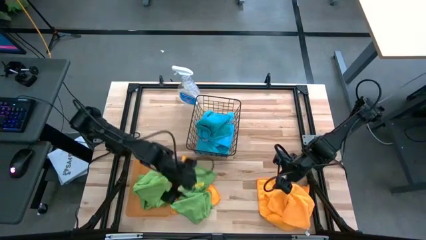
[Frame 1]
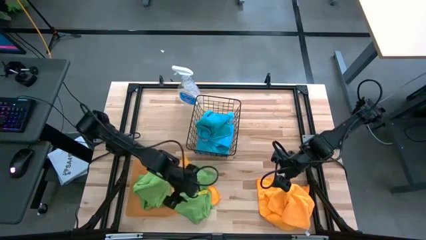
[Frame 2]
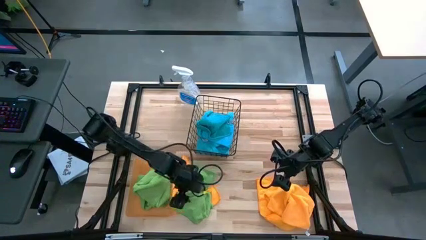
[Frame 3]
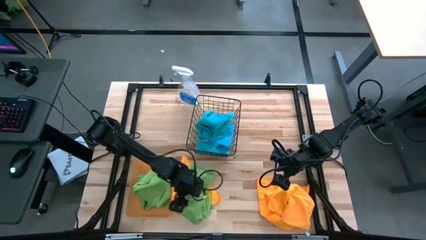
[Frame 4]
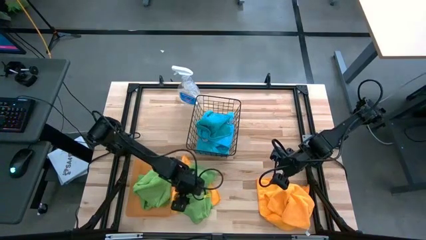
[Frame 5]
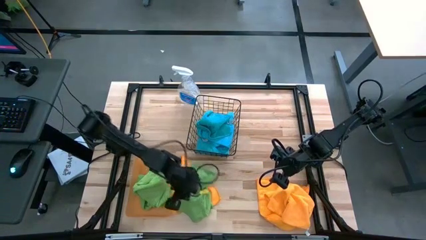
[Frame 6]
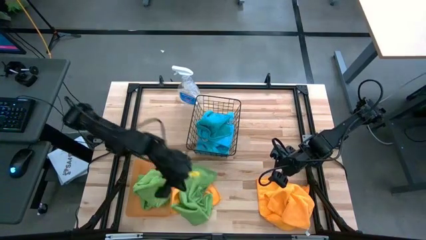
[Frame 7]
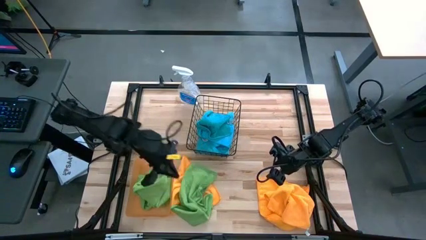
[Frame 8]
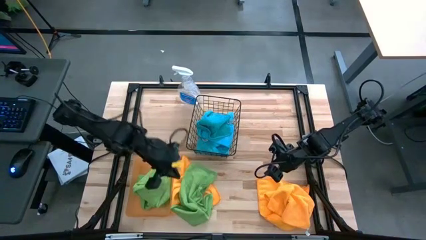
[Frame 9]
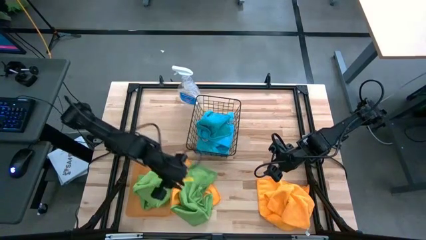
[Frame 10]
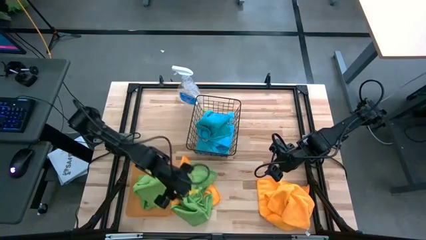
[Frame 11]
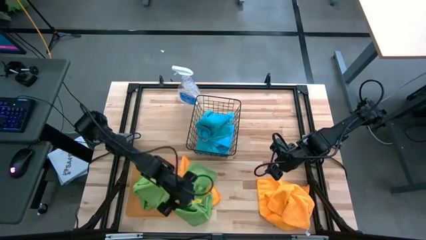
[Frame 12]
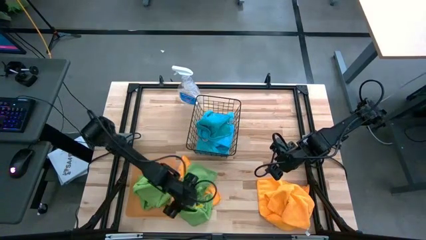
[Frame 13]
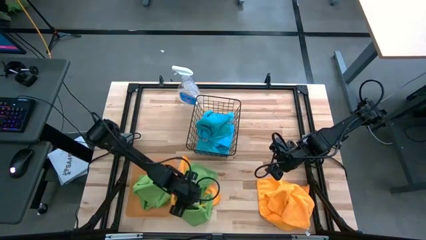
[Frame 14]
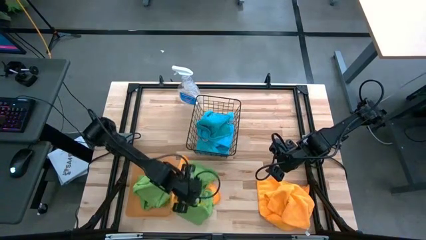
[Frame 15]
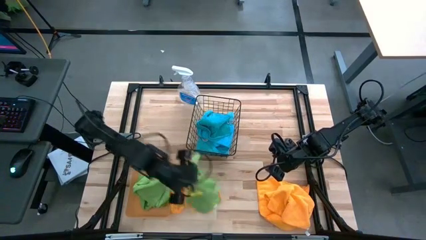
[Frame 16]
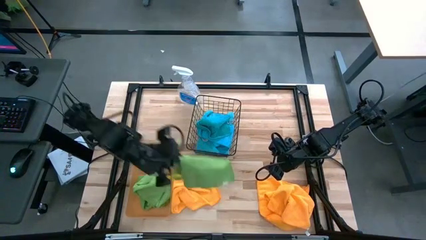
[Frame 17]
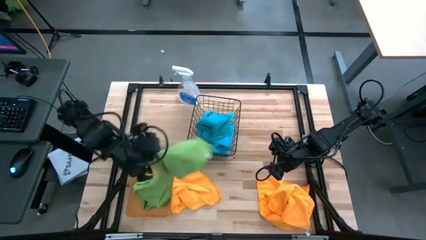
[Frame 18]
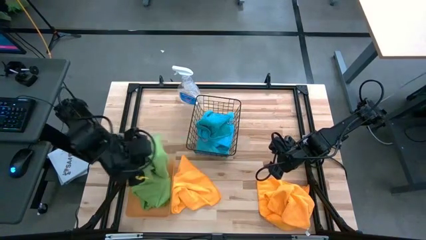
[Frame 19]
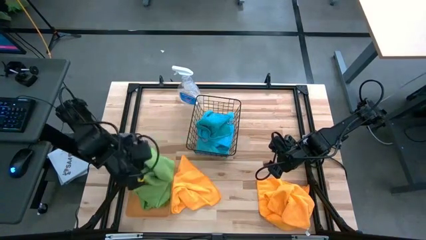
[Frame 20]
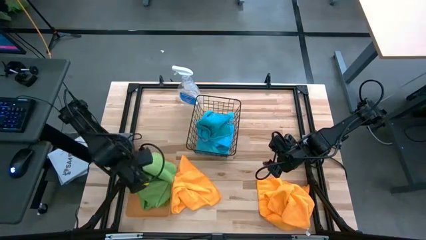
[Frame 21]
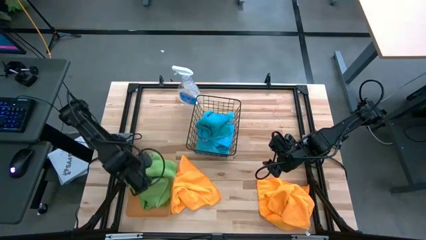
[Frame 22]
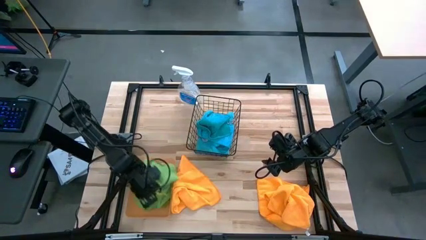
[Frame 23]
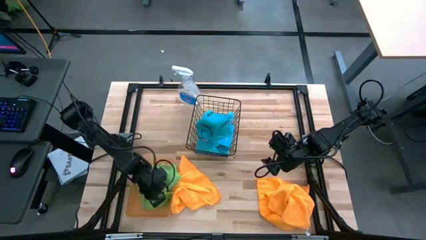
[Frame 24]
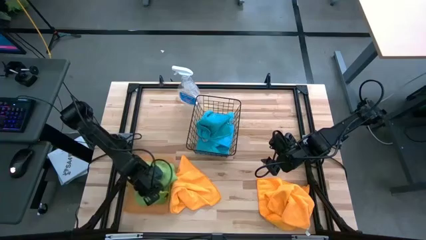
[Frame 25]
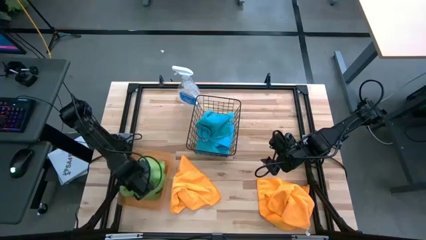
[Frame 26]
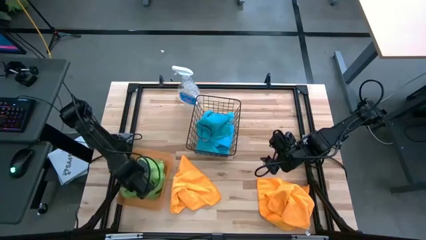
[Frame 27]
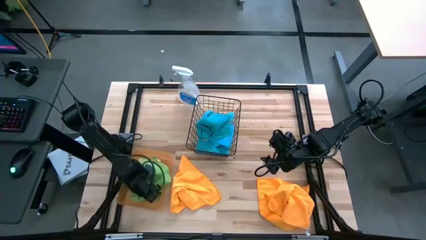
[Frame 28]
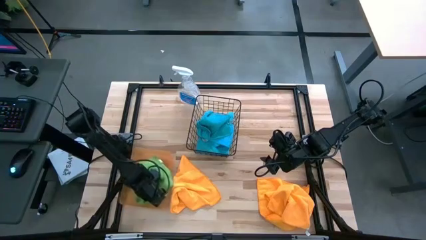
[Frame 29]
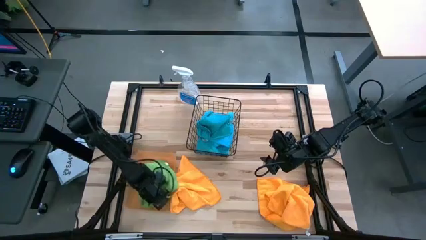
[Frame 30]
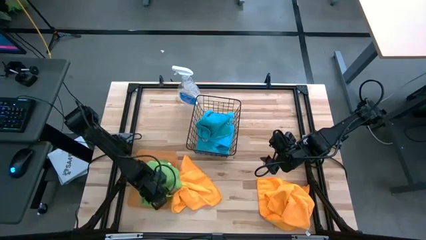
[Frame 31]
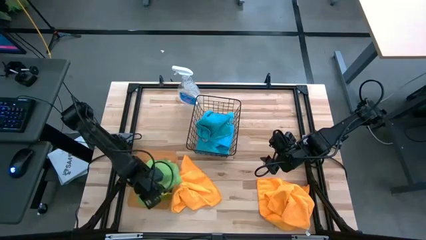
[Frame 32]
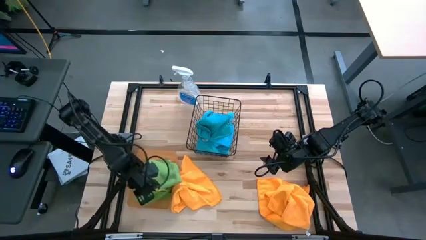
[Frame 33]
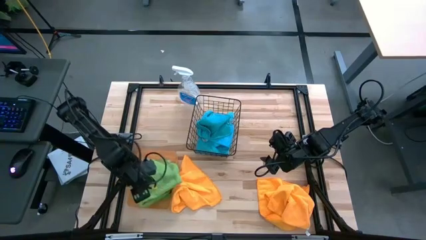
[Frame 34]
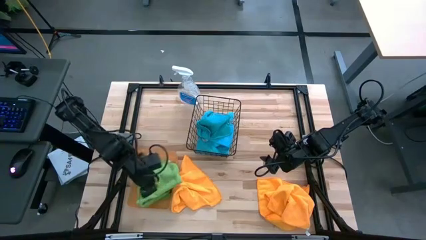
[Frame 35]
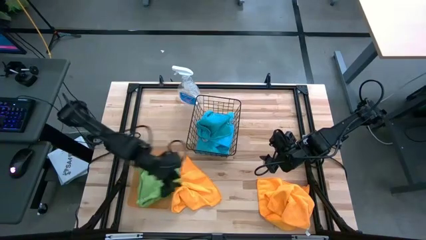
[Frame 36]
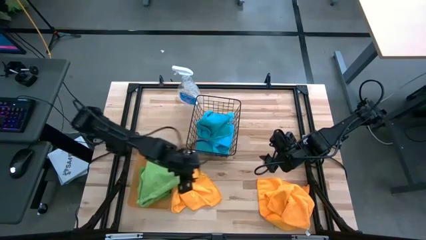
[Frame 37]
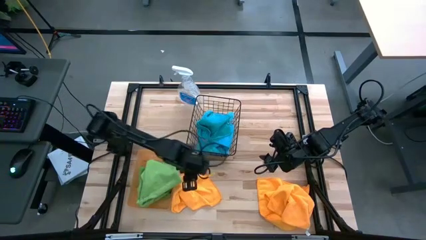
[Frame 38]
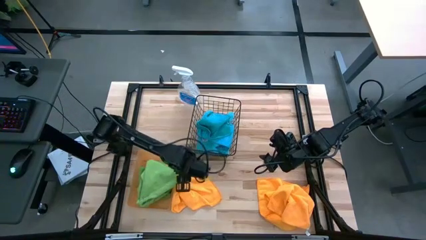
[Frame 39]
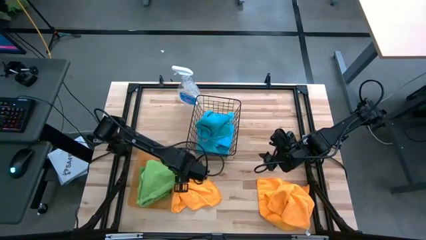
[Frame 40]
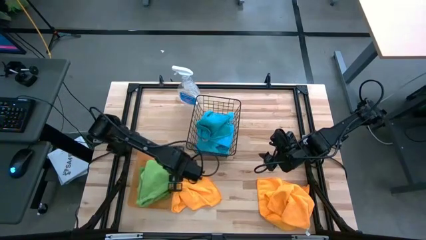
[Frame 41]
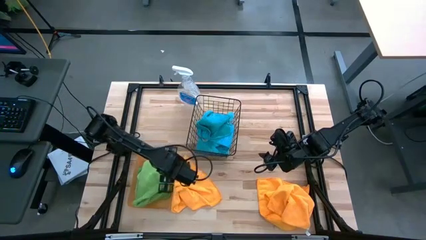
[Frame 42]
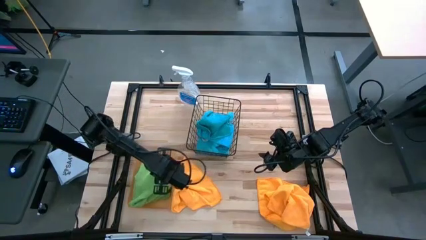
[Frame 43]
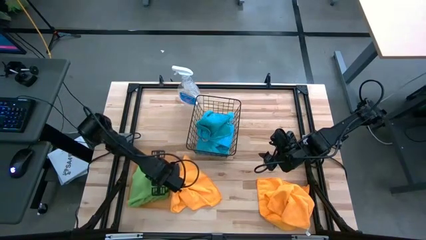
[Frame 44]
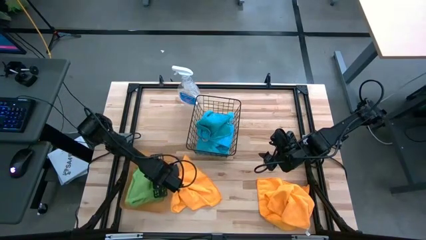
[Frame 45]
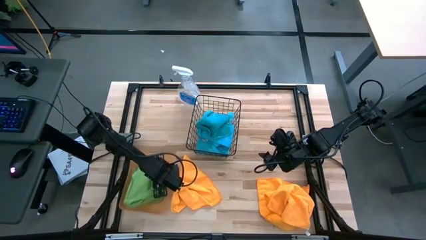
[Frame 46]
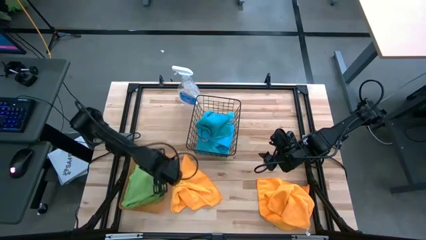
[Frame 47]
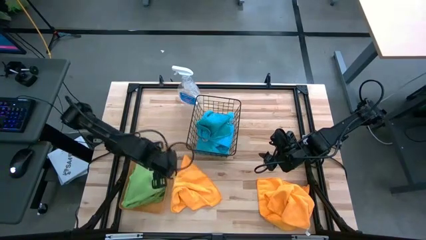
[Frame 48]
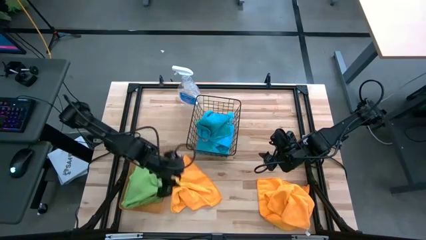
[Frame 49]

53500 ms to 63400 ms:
Task: Sort microfiber towel by color & place in baskets
Put the green towel into the orange bin

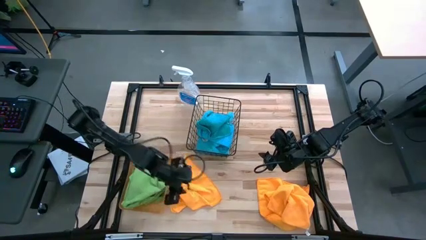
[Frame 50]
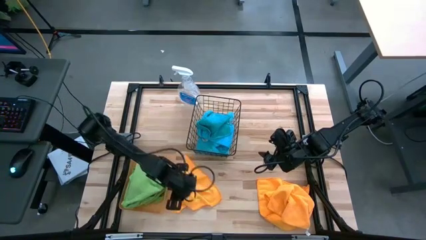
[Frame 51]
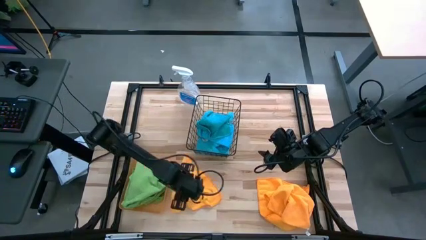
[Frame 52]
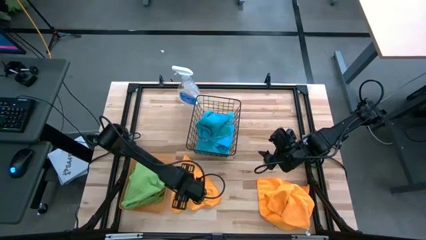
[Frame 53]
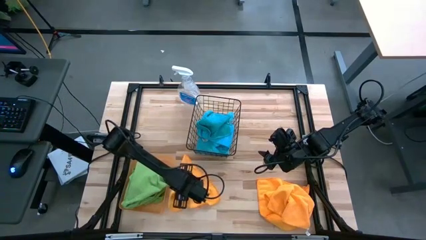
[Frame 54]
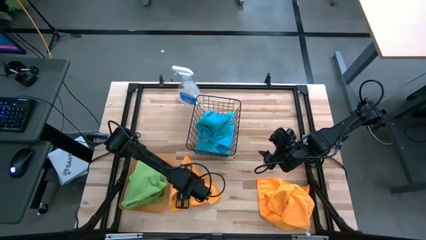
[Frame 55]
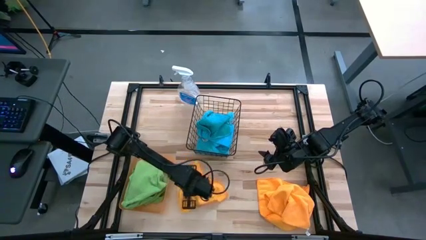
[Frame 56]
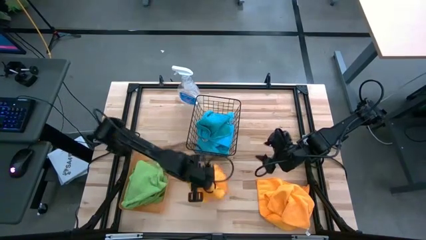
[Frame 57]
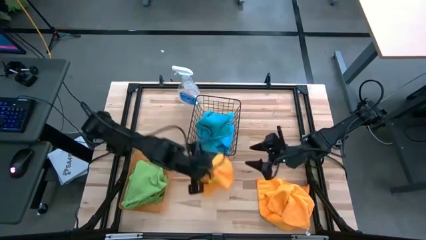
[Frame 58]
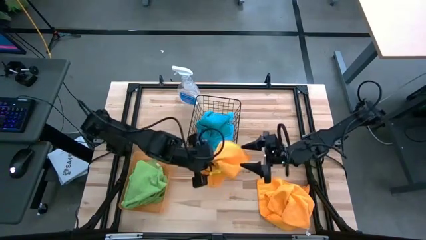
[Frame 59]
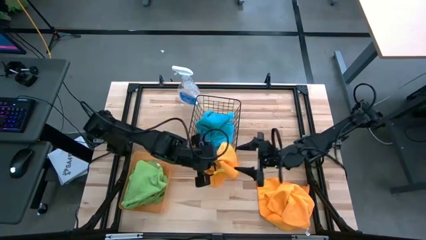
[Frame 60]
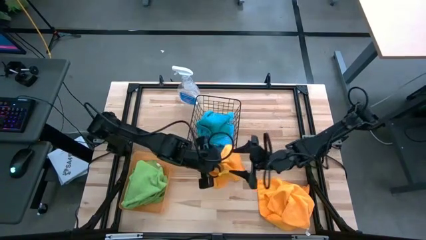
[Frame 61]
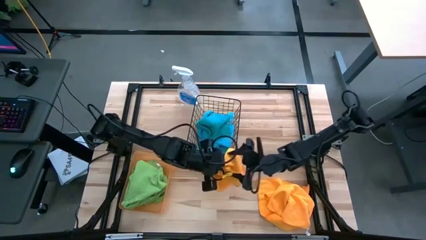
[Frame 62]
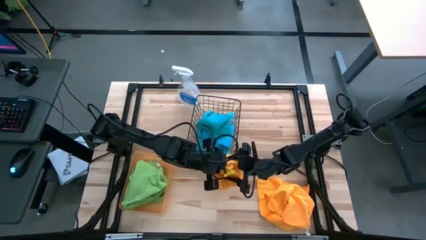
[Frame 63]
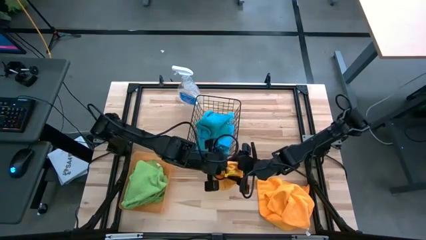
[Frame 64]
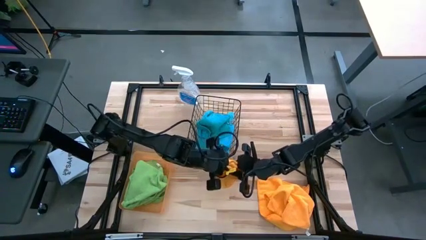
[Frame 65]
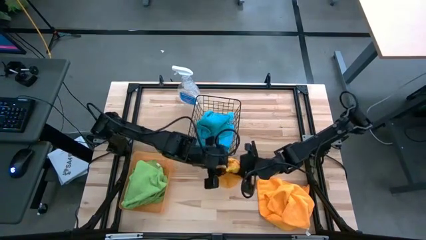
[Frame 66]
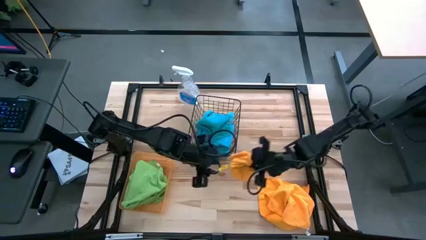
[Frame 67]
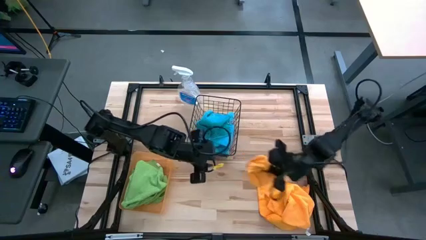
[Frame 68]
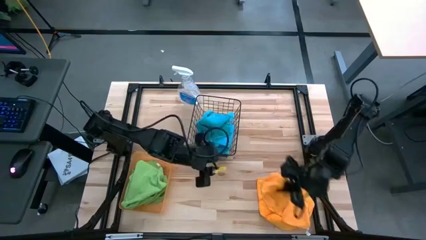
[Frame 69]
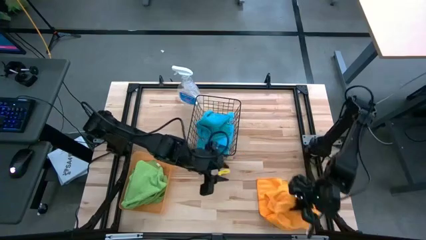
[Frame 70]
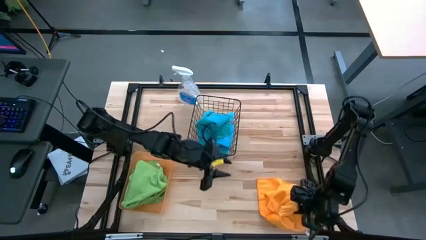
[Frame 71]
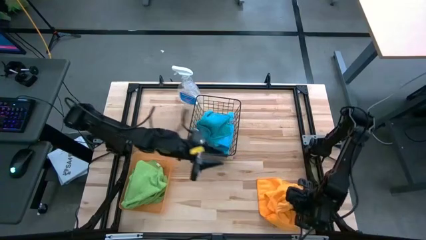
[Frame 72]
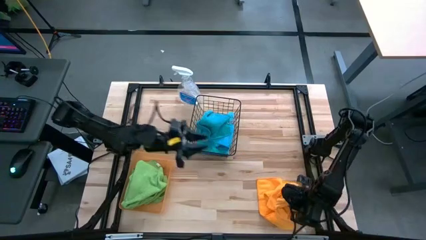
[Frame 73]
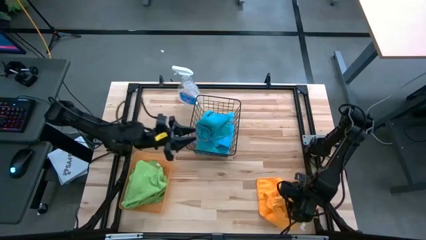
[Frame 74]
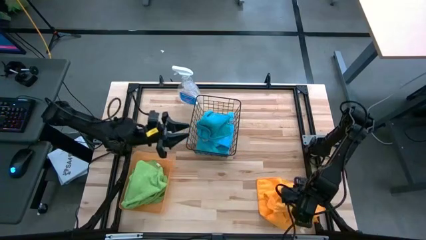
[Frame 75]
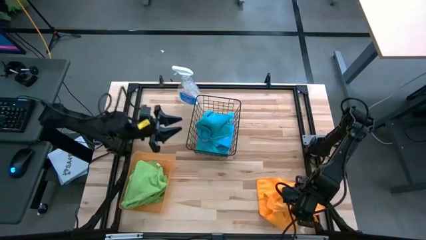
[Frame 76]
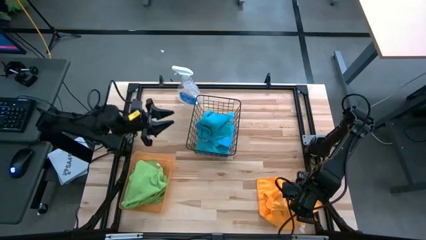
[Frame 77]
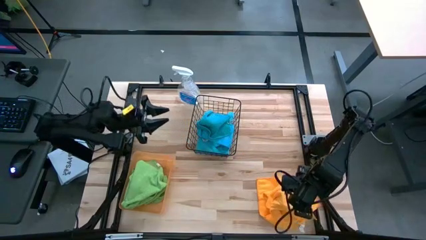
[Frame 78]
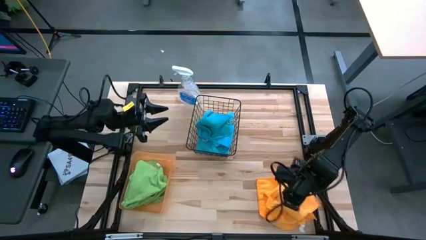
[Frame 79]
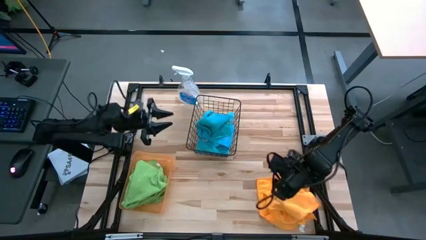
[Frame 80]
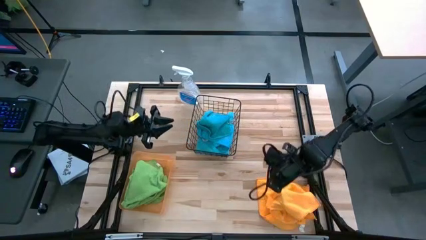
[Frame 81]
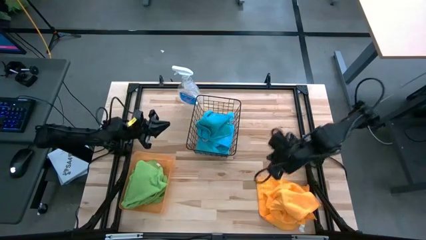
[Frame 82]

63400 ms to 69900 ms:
Stack the left orange towel on the right orange towel
